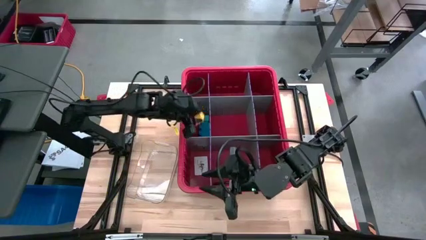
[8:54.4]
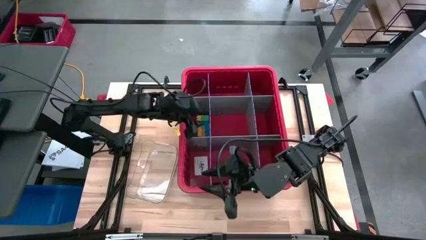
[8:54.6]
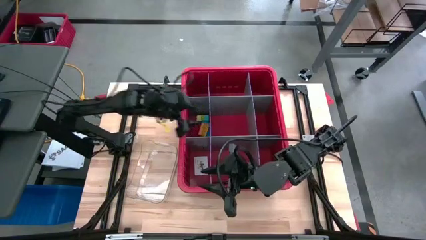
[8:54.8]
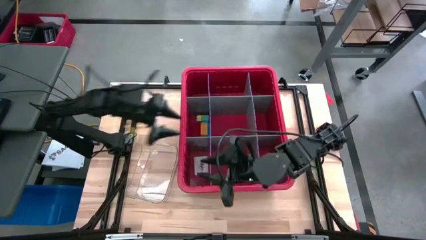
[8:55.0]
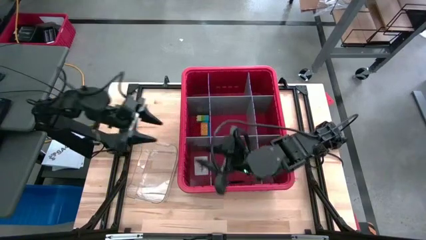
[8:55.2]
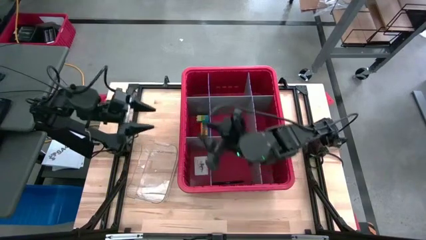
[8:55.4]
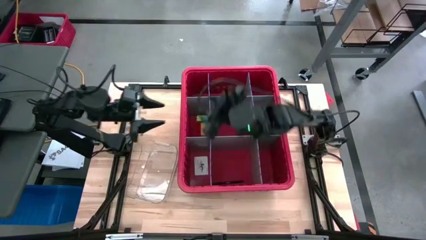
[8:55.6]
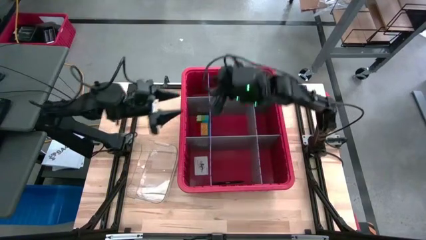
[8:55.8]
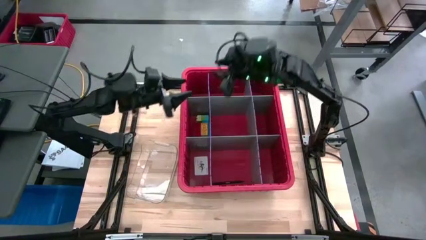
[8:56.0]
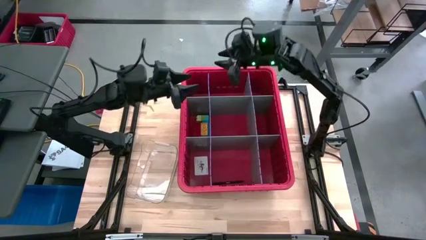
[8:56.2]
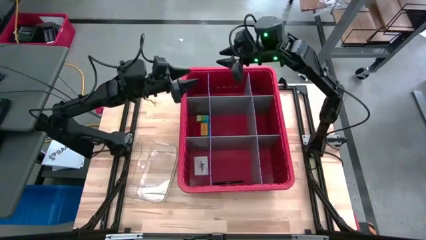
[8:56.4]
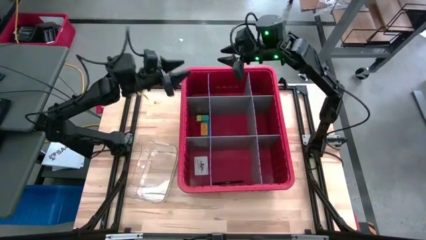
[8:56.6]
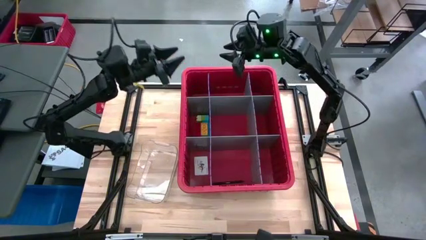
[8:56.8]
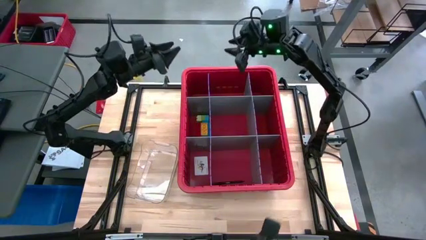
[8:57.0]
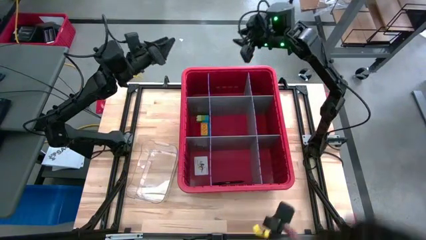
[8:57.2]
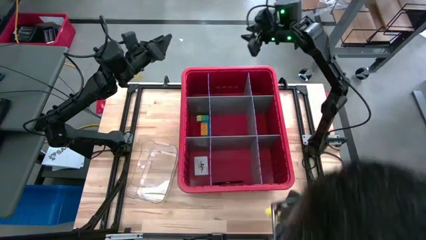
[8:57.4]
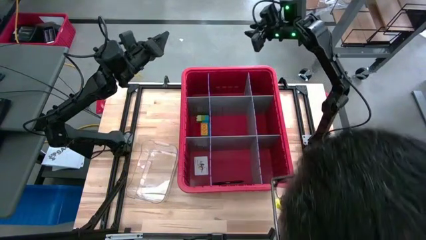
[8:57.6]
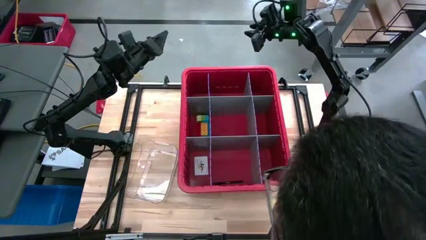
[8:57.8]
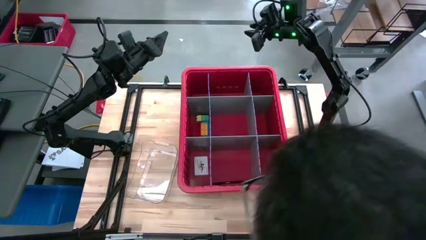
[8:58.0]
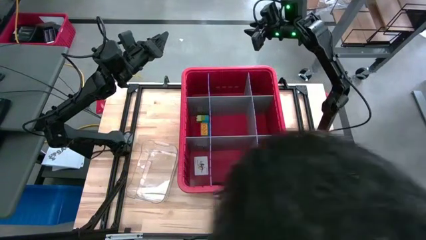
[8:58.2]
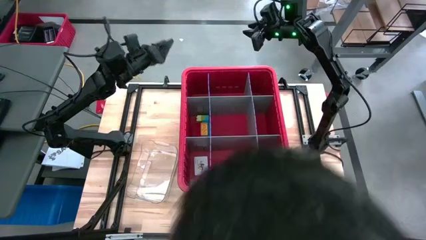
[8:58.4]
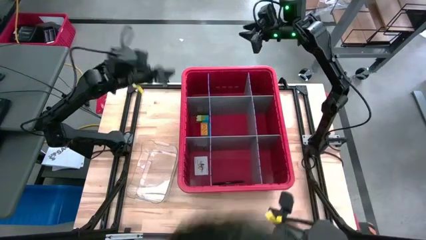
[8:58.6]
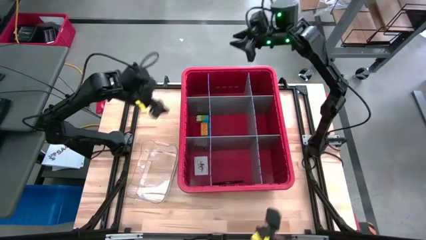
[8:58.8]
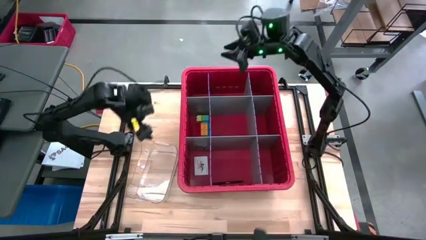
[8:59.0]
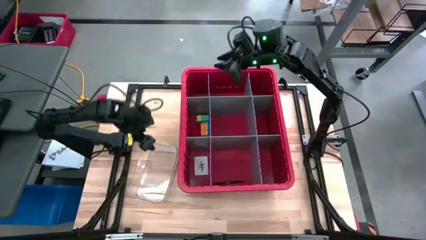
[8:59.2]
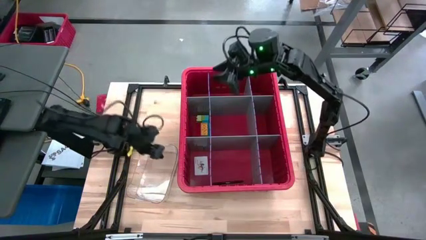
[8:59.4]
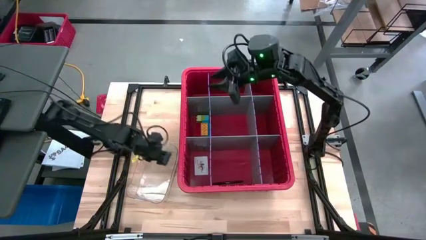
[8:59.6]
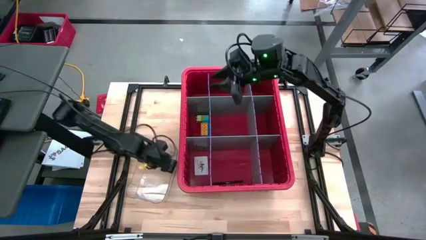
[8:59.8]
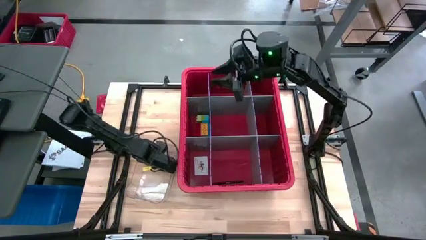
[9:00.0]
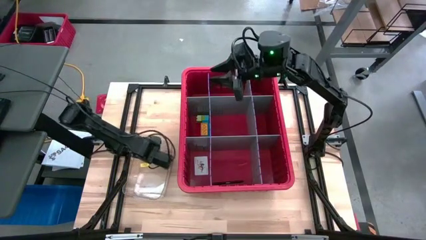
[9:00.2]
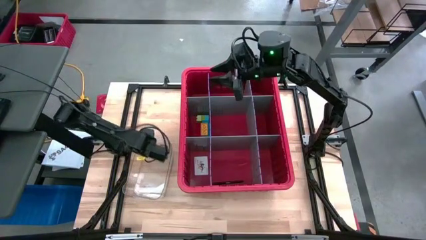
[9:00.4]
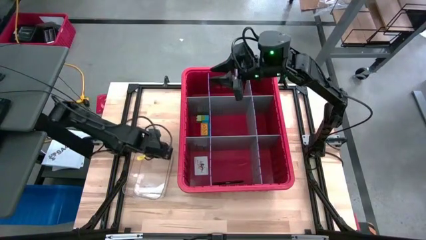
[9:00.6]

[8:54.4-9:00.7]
Task: Sort blocks
Put the brown pencil into the bin

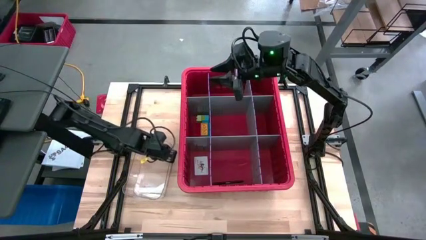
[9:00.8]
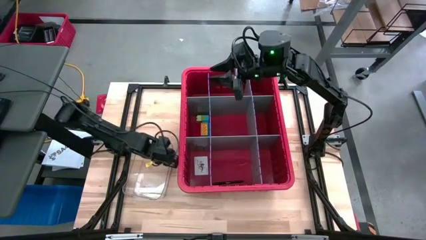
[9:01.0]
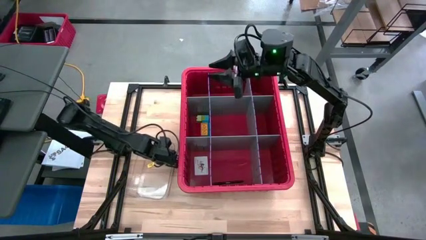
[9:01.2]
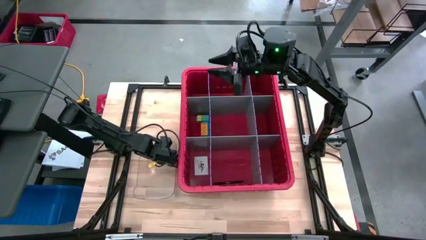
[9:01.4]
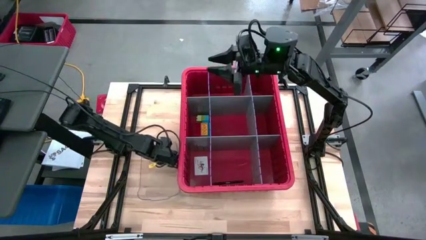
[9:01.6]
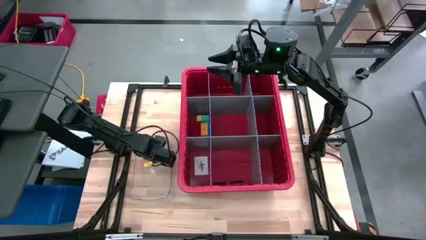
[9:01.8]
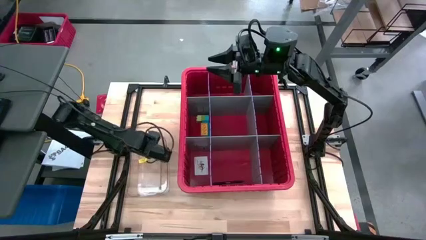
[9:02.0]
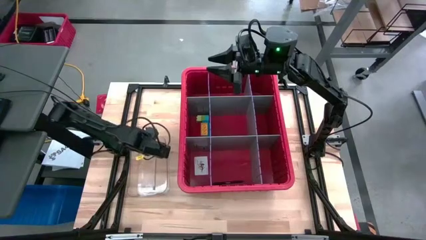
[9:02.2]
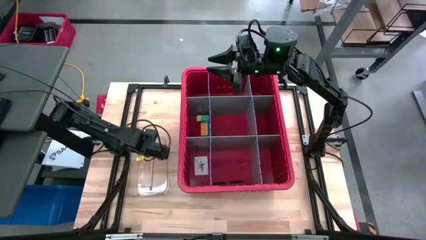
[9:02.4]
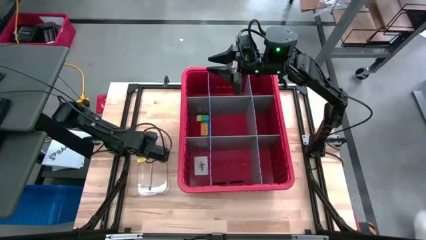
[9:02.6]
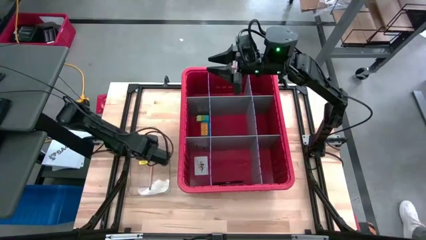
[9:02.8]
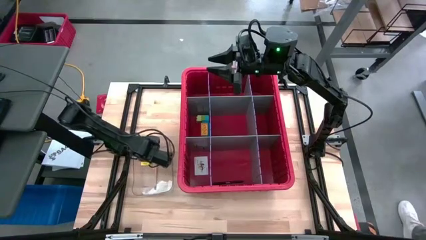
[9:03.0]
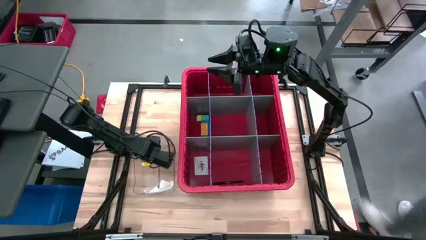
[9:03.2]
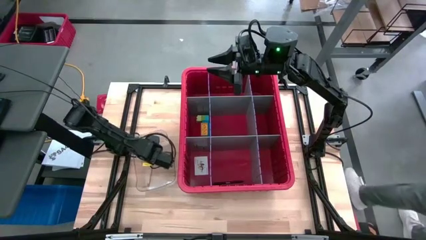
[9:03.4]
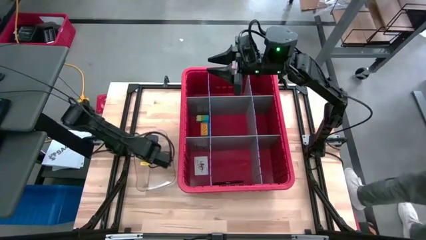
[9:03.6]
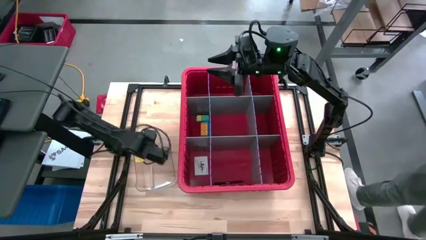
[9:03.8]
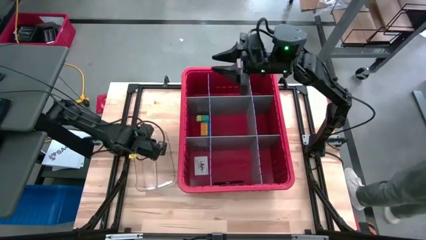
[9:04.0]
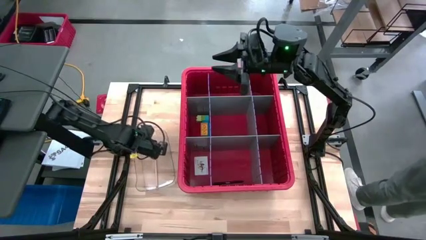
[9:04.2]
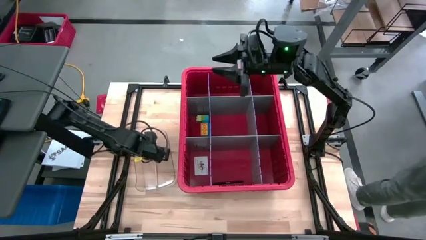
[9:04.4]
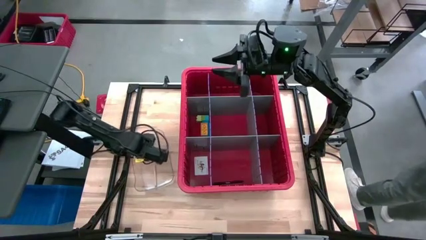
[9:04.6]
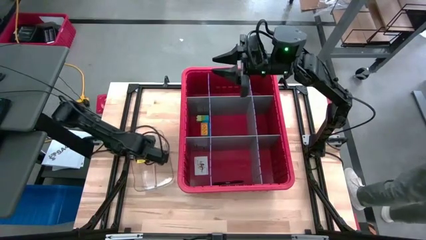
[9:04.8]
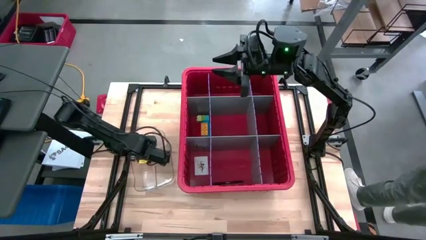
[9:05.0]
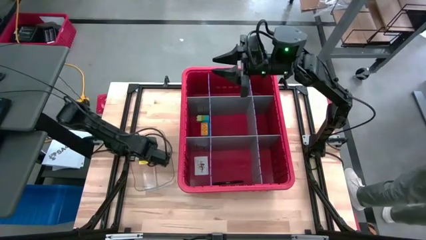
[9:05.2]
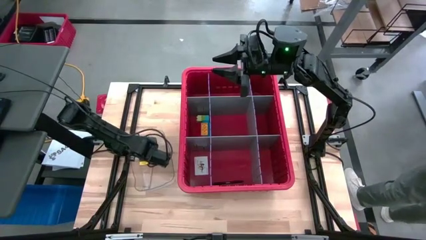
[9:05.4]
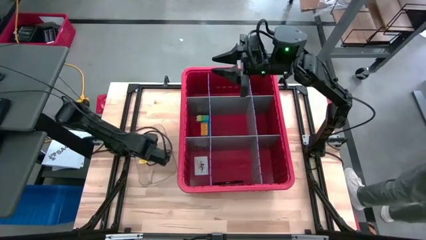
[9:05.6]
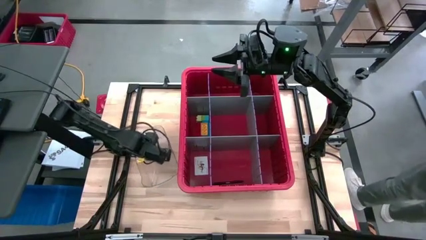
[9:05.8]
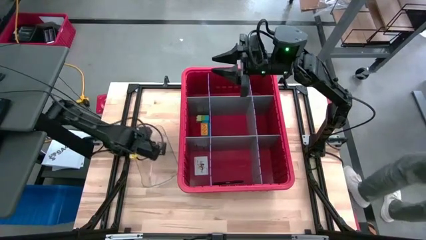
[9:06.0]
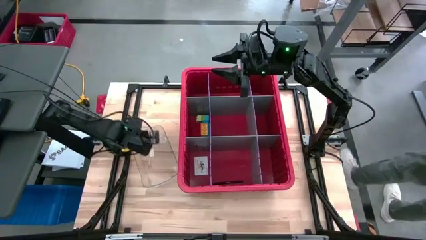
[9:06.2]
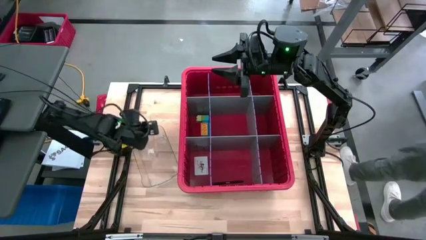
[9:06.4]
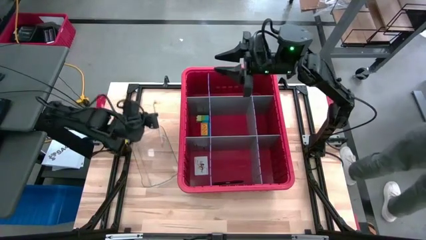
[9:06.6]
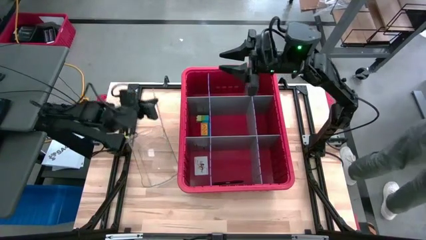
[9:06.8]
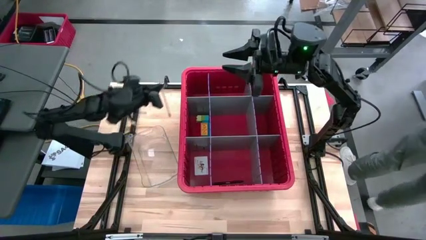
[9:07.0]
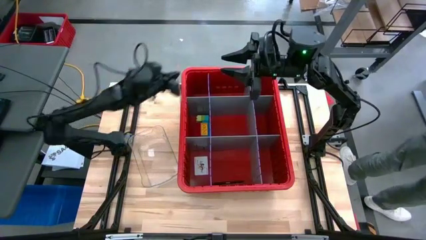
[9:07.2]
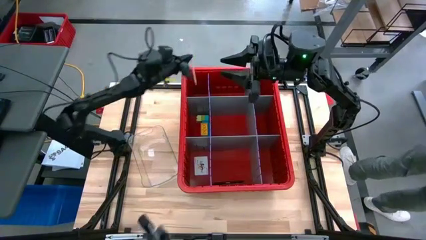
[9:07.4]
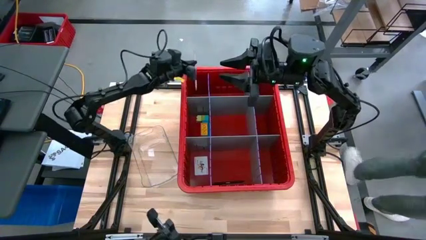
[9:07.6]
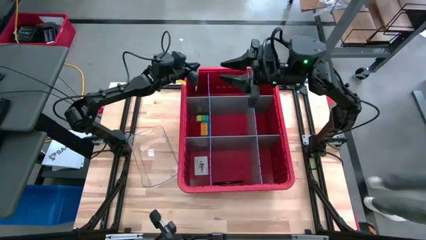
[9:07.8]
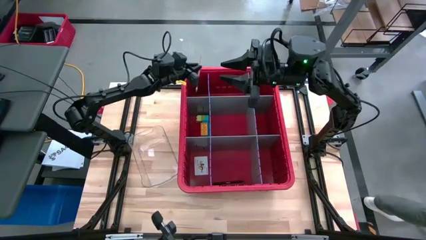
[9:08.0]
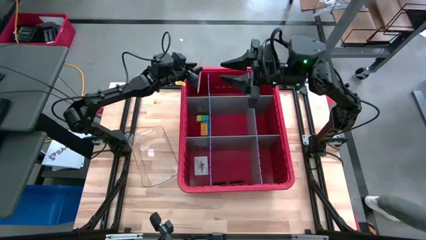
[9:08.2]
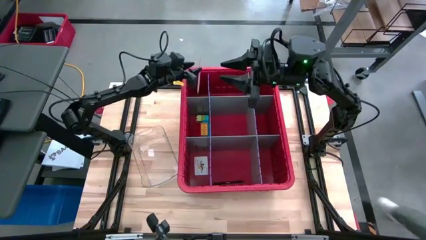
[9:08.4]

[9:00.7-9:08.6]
Put the brown pencil into the bin
